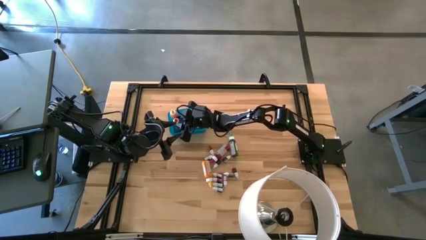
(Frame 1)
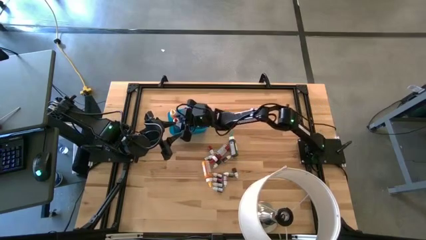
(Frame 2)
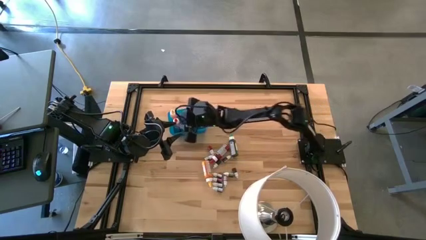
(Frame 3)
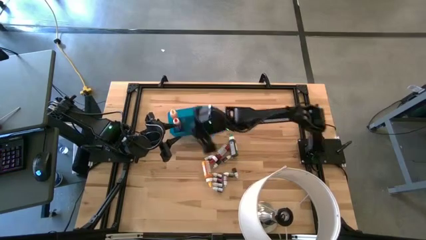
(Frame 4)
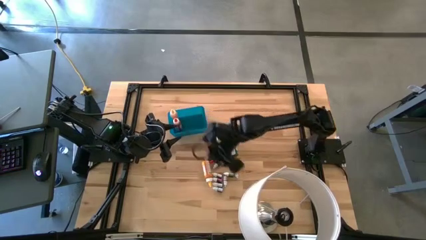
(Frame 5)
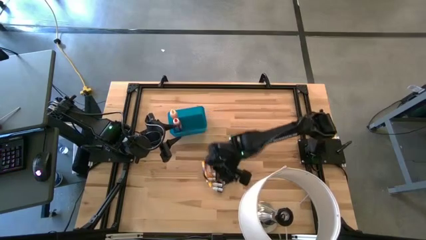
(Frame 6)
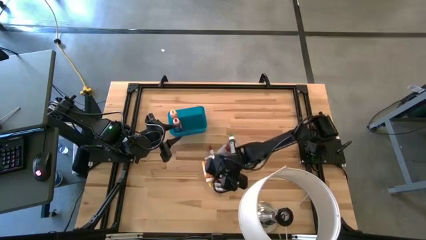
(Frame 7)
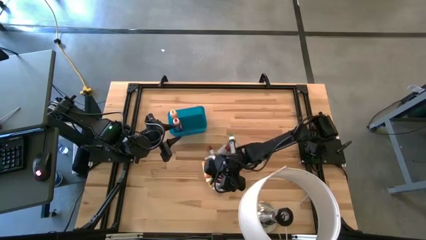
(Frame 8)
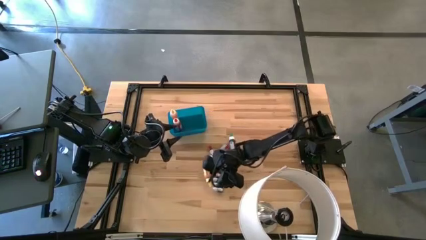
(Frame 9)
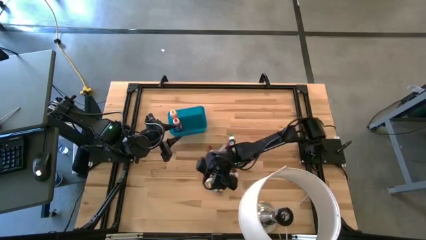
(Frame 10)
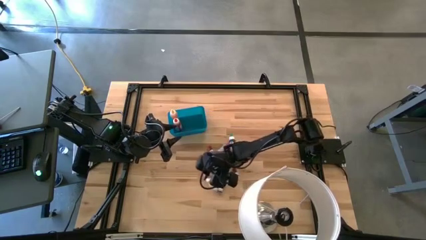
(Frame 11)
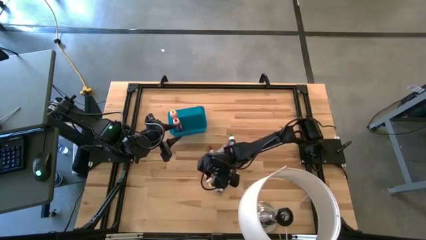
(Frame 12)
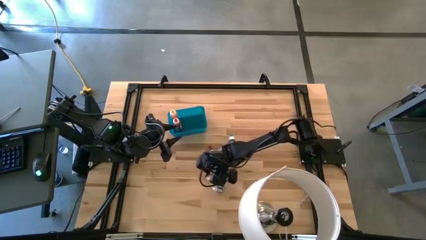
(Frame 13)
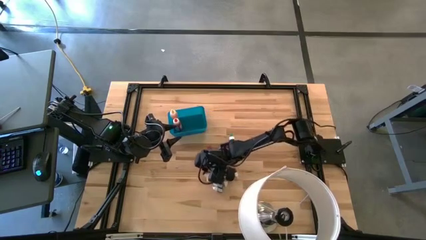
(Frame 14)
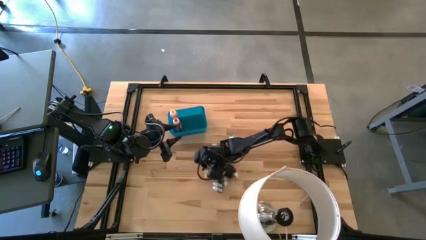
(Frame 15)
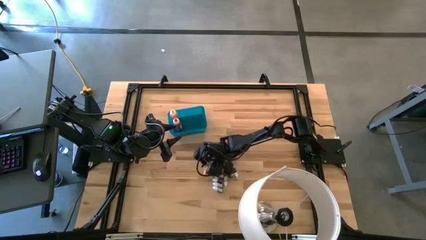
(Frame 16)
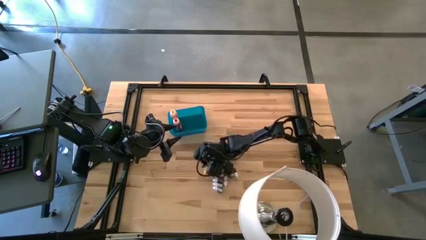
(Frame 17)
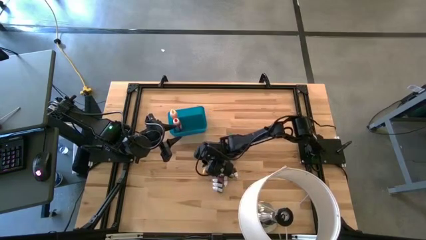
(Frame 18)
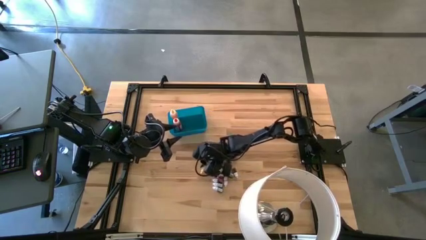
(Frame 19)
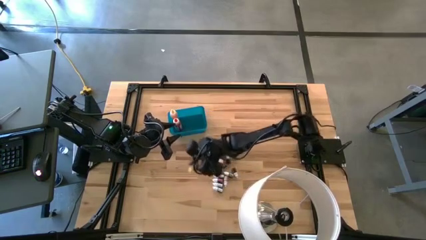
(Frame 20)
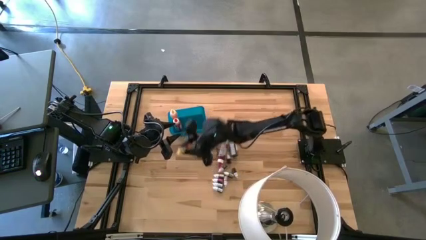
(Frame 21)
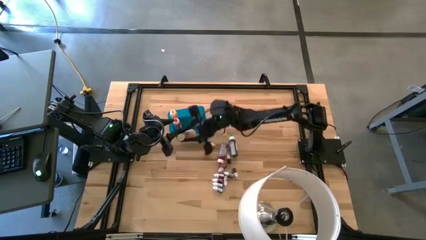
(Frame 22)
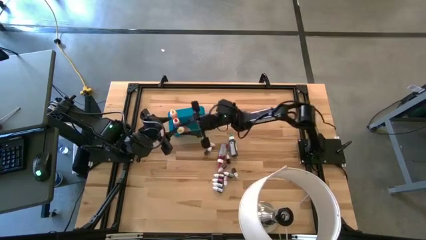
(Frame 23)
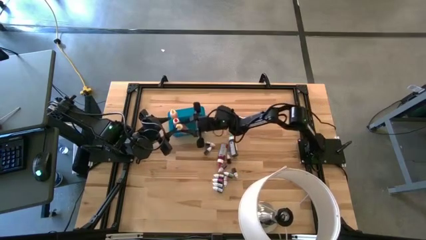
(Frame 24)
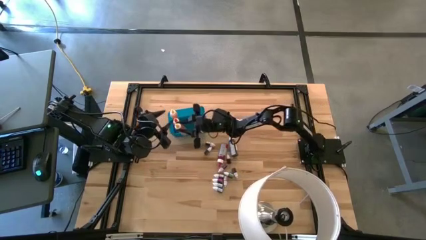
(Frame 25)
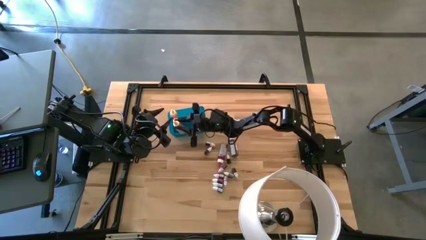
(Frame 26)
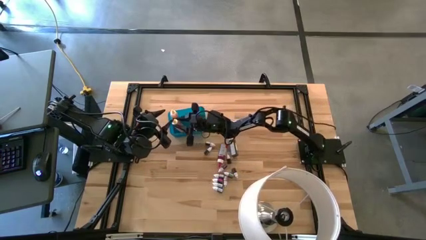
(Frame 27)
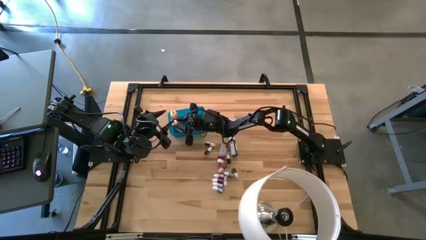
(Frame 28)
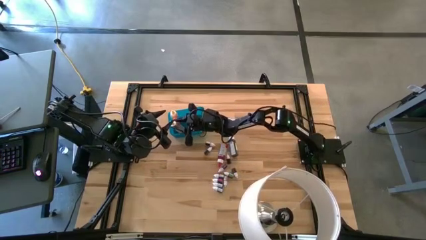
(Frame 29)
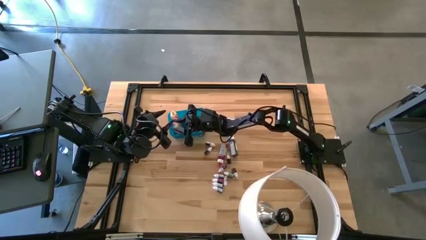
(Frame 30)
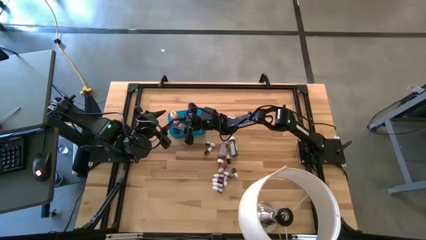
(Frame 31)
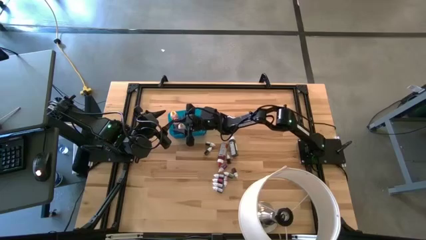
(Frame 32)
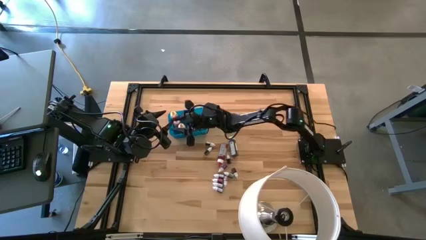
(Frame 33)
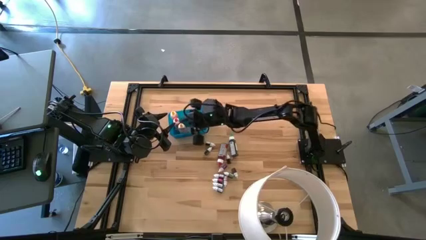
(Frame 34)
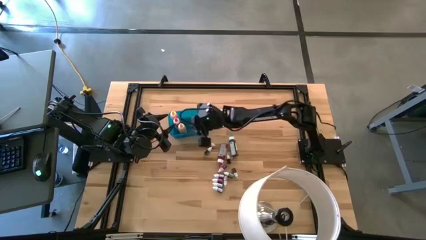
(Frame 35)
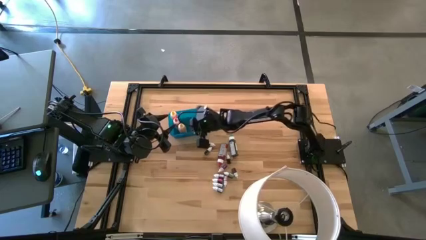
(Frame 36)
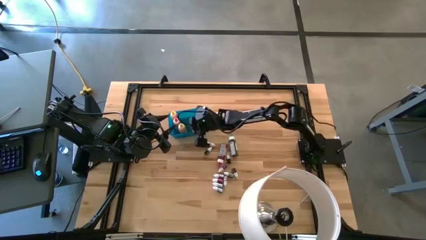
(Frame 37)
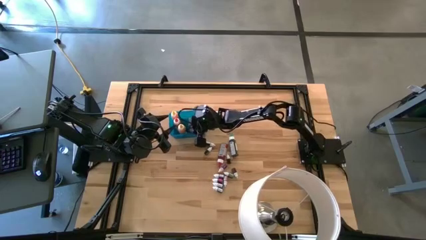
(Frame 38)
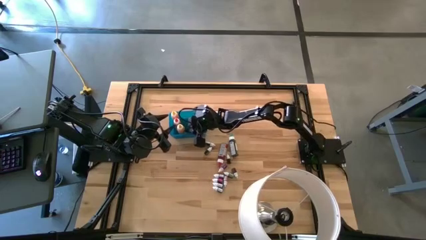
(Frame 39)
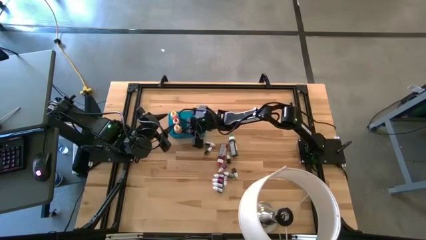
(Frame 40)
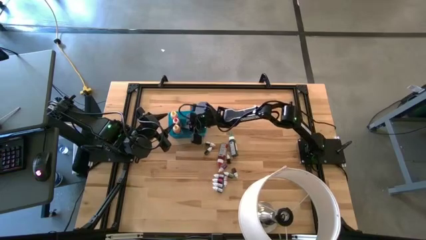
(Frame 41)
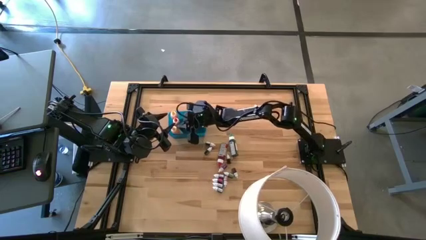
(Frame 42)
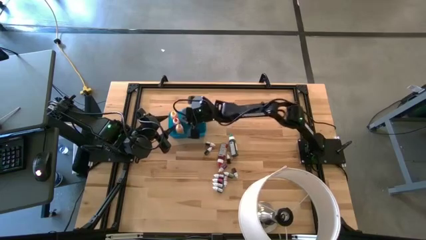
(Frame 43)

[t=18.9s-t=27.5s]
Task: Pick & Place food coloring
Put the large yellow food coloring bottle into the blue bin

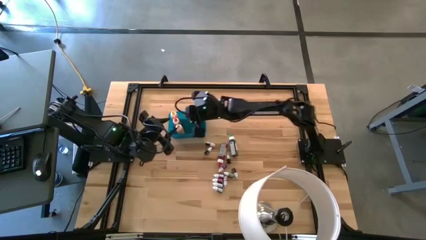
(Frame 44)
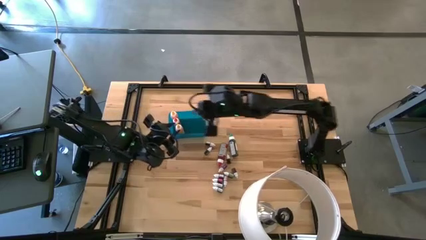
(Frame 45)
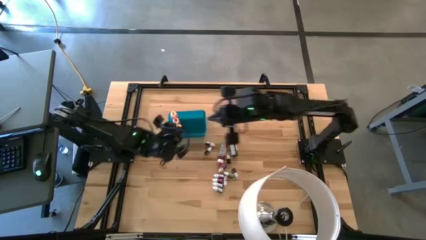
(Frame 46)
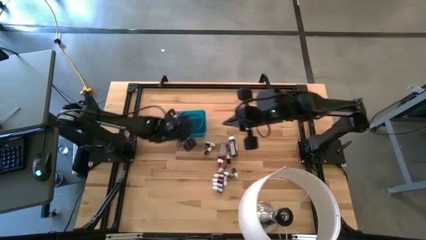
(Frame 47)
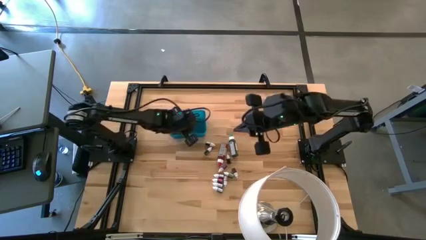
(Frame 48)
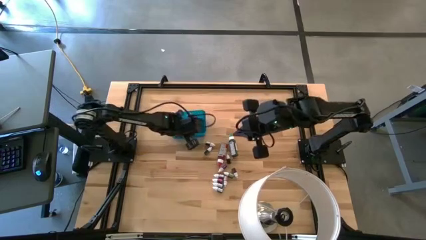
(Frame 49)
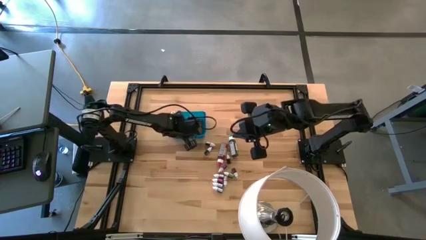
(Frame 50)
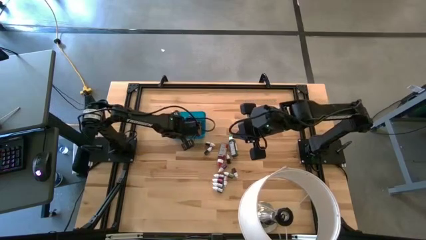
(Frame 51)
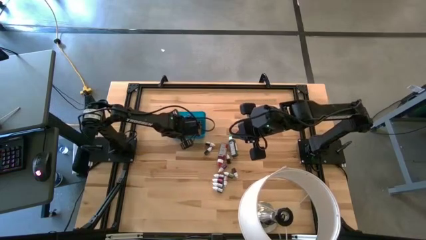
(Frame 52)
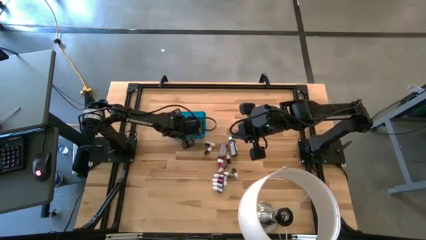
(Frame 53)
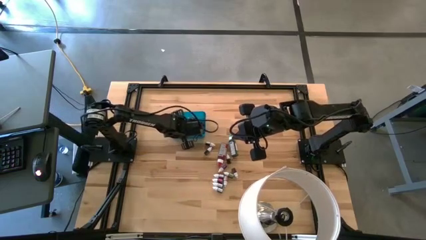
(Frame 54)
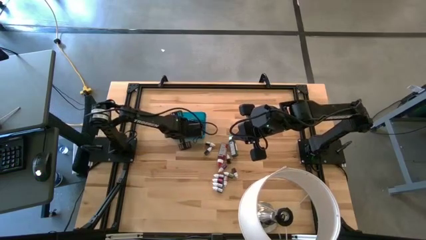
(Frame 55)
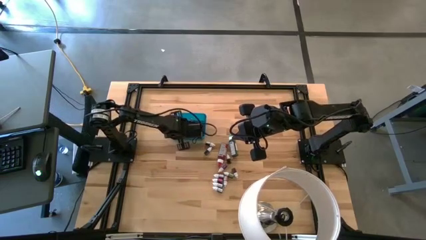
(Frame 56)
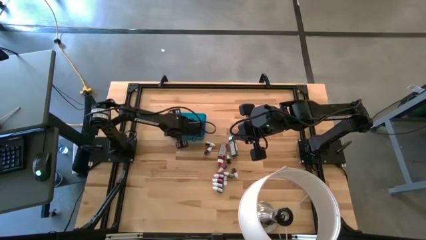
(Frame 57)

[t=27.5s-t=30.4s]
Adjust the large orange food coloring bottle in the blue bin

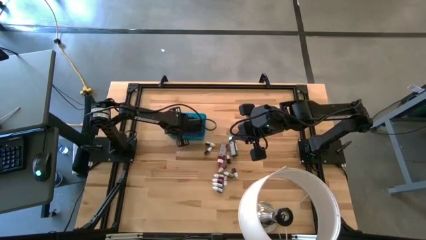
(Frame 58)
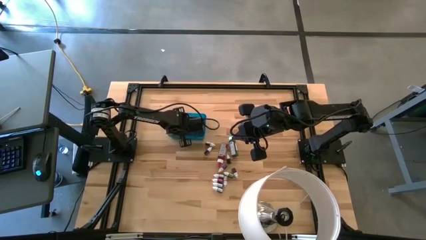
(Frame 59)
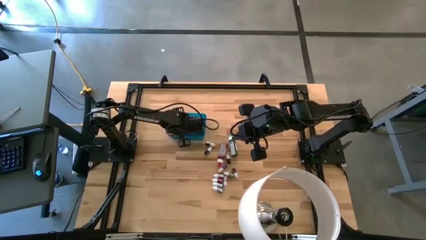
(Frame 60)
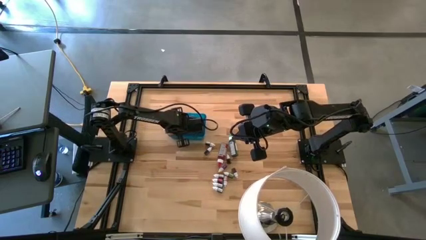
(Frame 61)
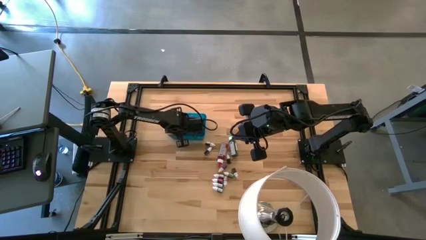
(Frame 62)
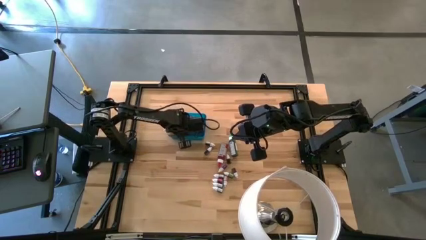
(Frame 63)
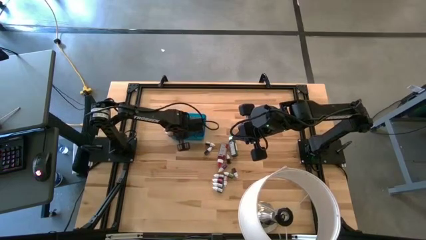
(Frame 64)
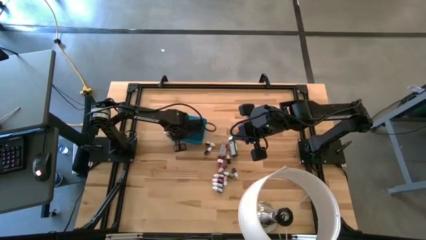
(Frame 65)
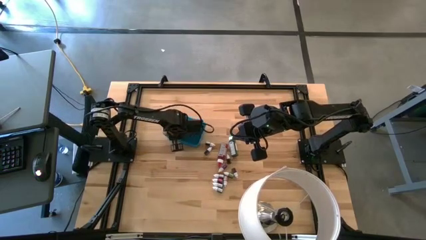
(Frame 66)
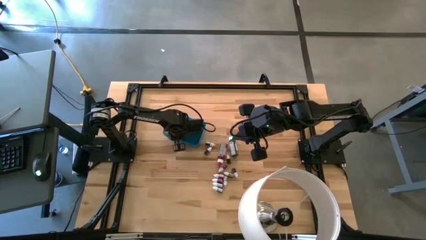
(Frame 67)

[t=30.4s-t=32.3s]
Adjust the large yellow food coloring bottle in the blue bin

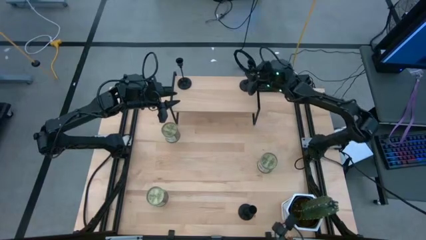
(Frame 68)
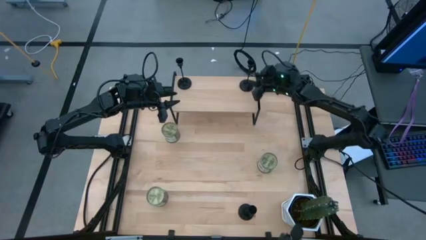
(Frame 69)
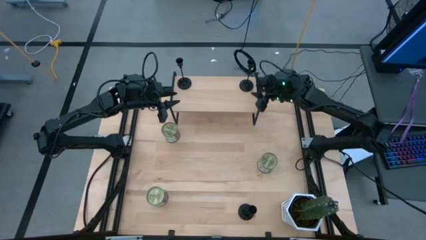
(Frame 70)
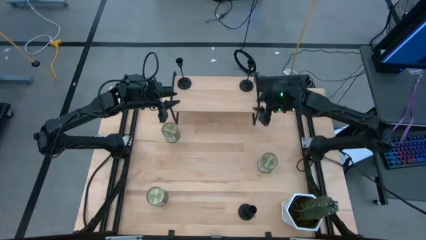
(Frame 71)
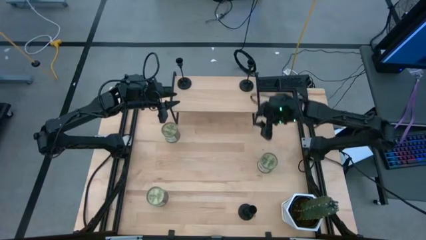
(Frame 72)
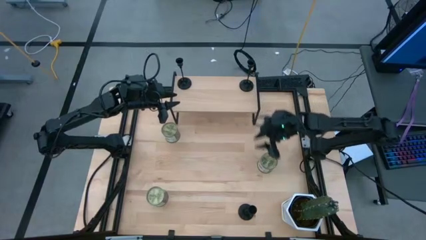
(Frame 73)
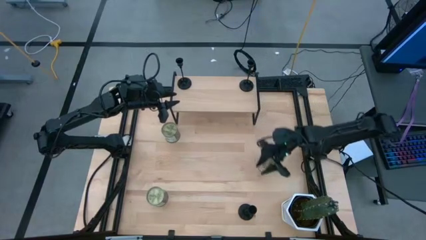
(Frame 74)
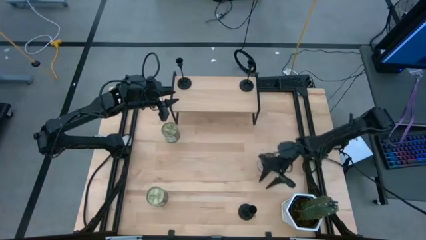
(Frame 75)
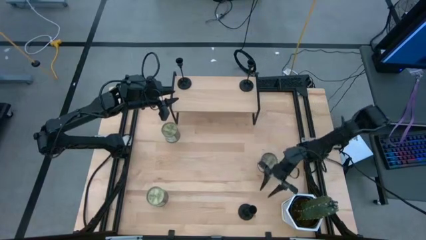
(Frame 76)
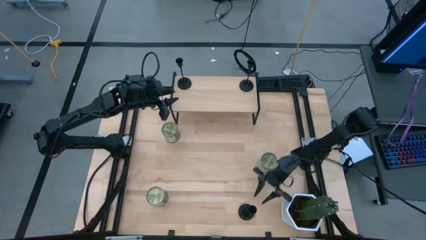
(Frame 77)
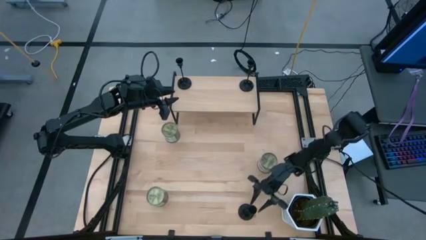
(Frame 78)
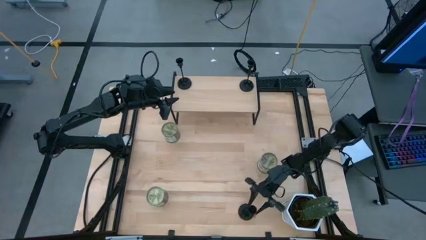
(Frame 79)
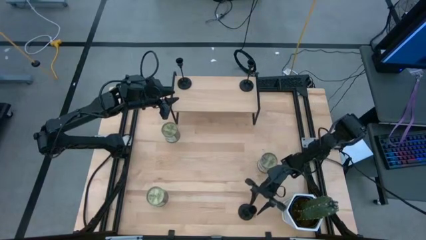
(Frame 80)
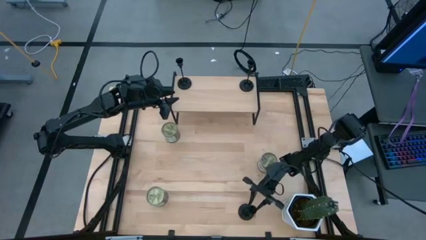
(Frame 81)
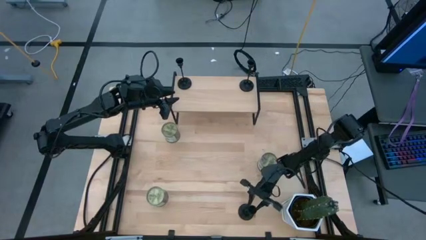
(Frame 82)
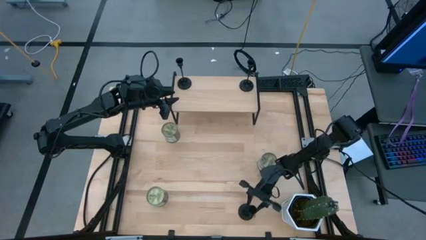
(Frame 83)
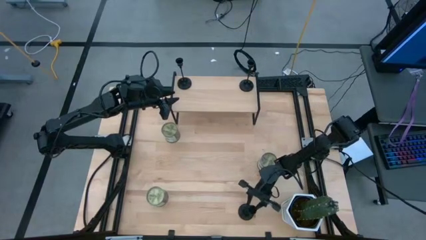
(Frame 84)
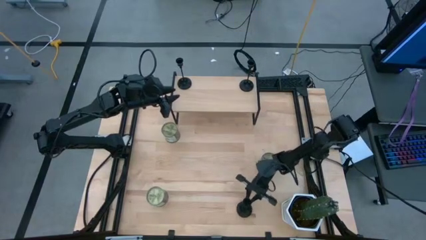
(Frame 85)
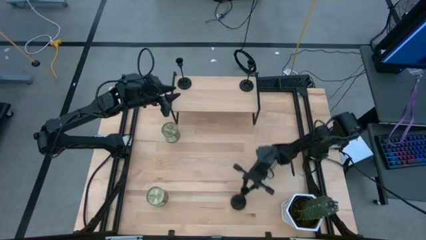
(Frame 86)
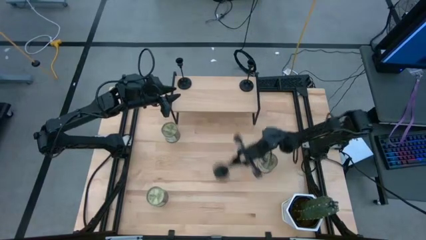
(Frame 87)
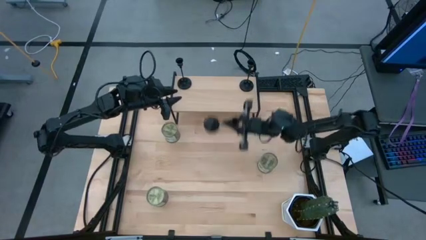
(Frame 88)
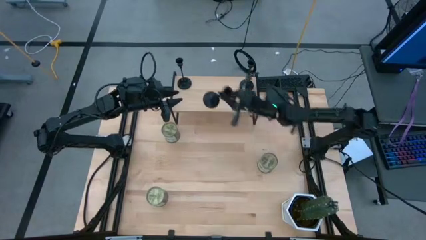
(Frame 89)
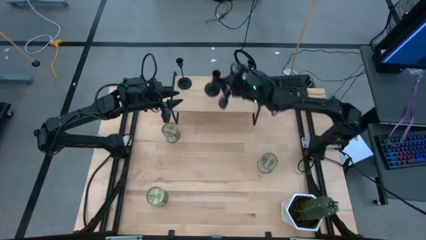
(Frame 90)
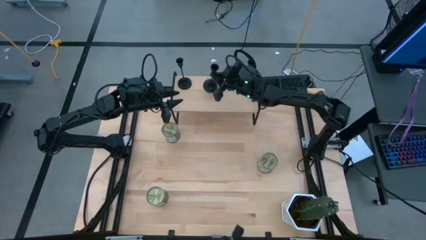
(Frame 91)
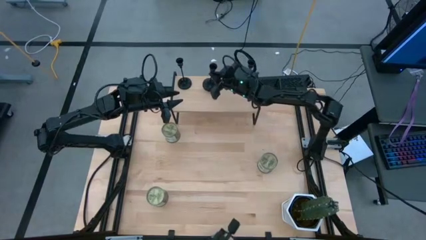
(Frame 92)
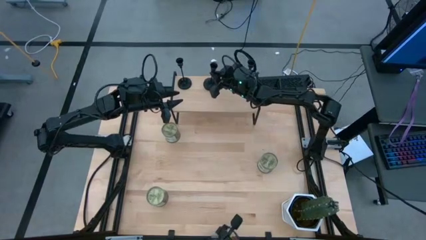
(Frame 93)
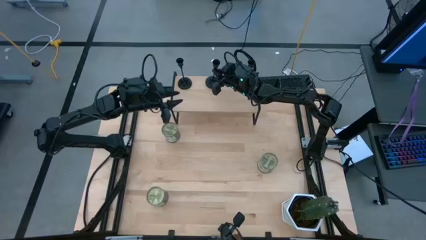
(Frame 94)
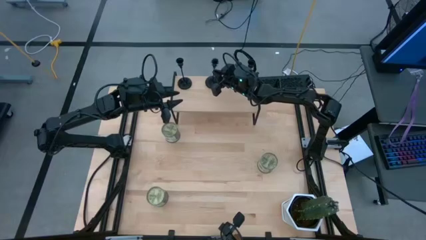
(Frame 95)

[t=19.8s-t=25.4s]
Task: Pick & Place candle stick holders
Put the black candle holder on the shelf
